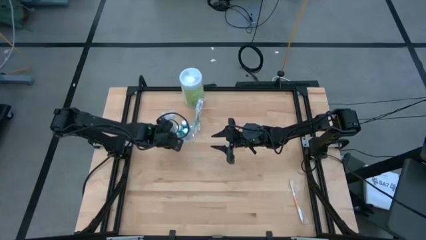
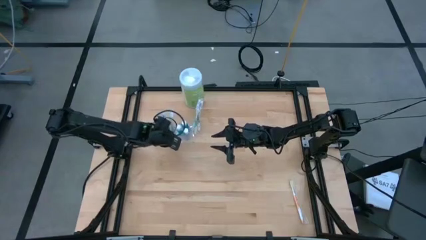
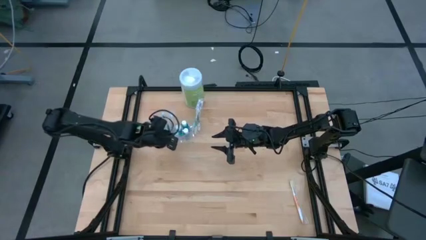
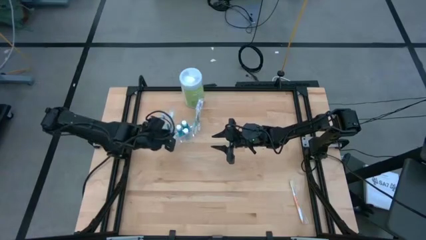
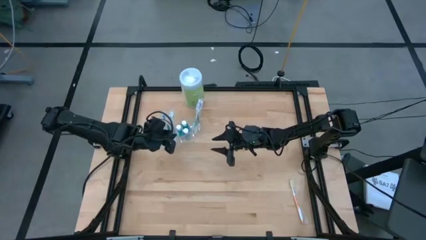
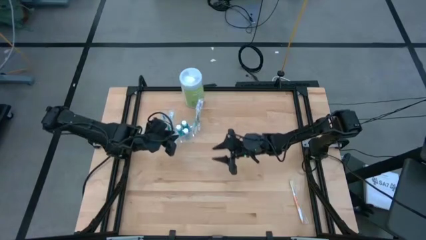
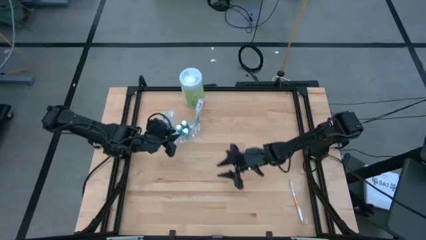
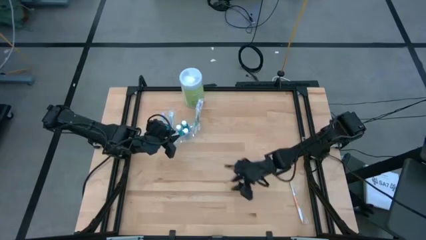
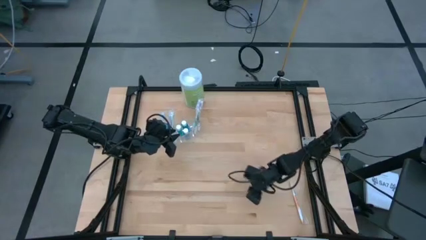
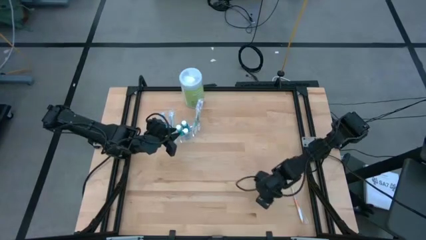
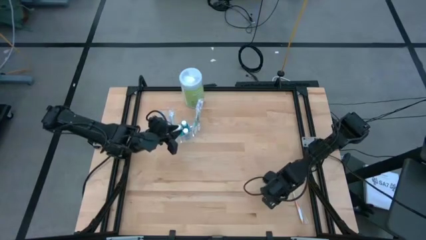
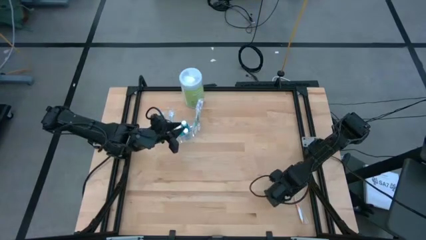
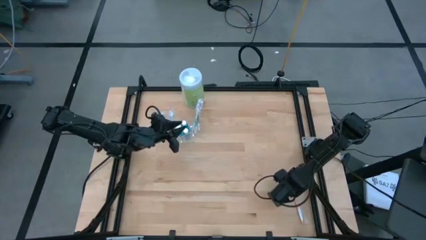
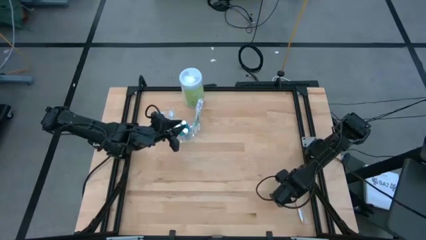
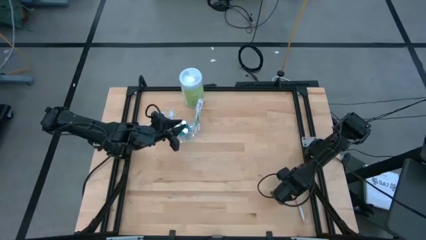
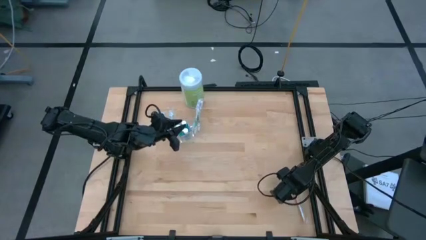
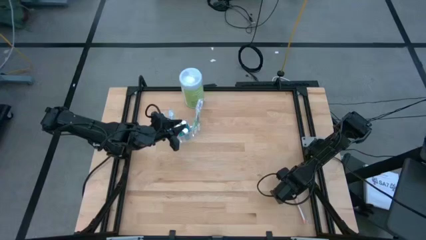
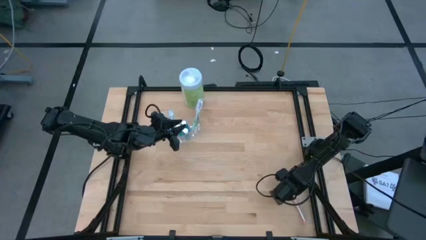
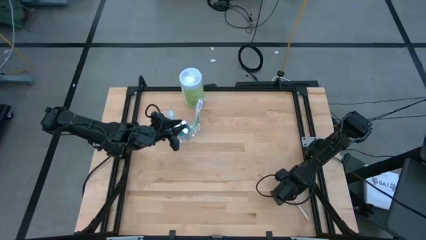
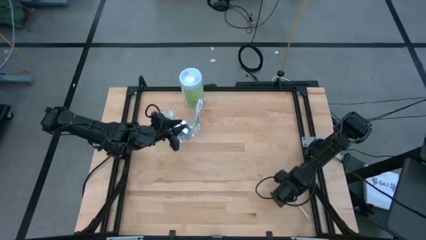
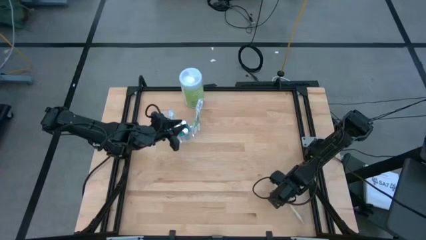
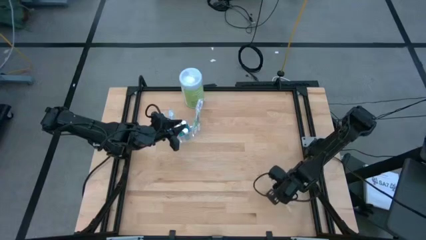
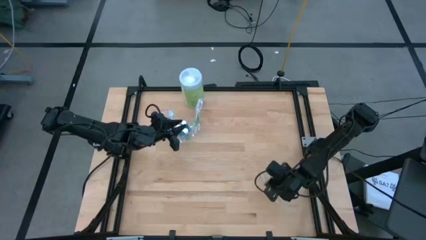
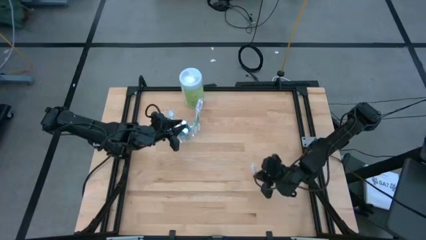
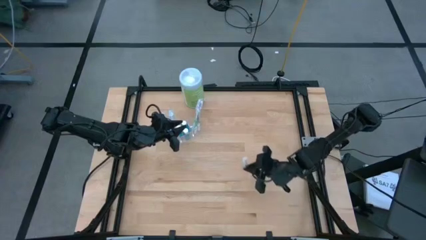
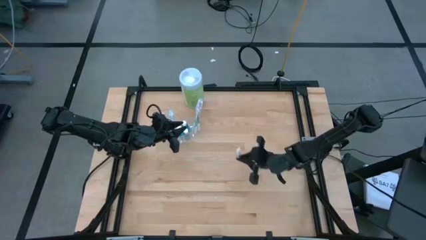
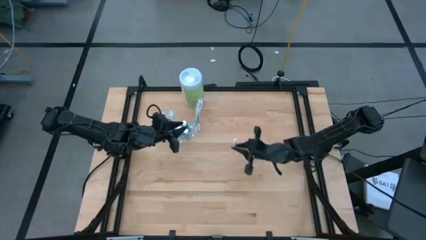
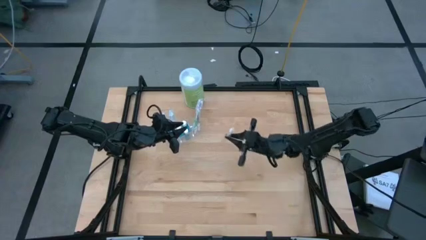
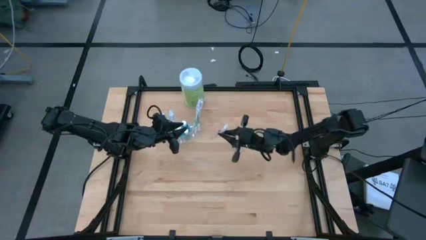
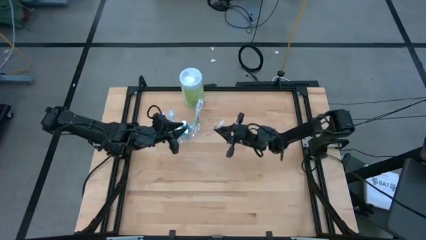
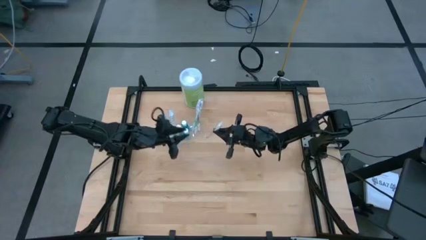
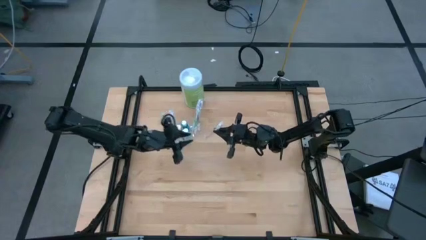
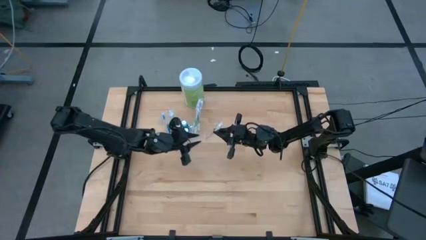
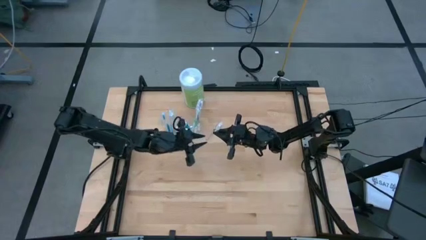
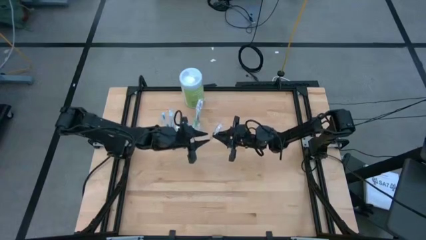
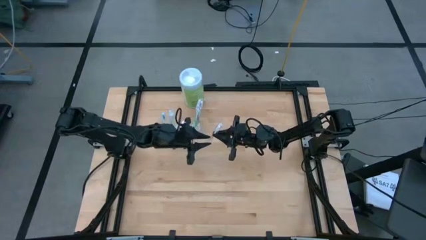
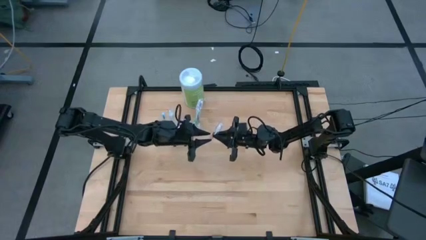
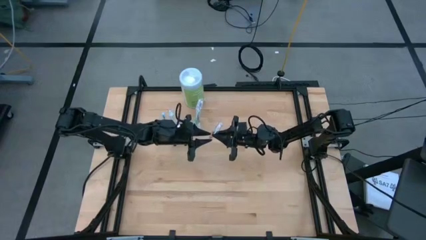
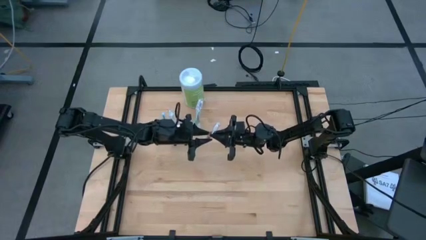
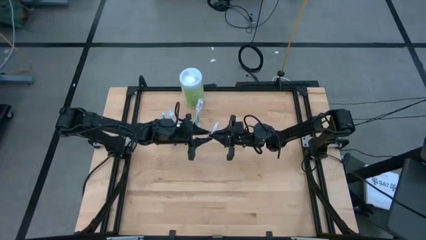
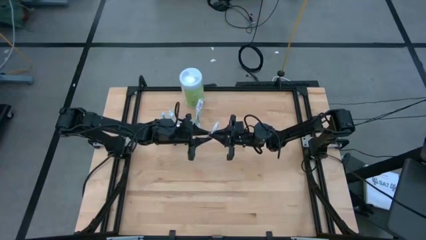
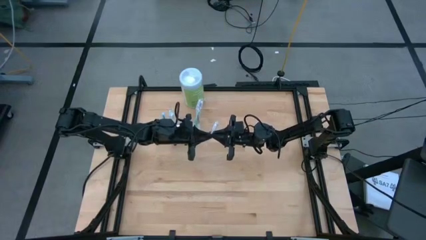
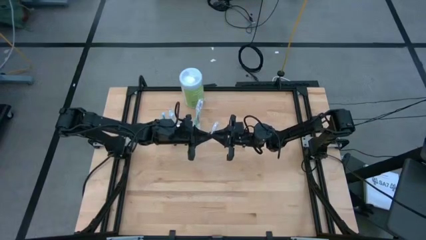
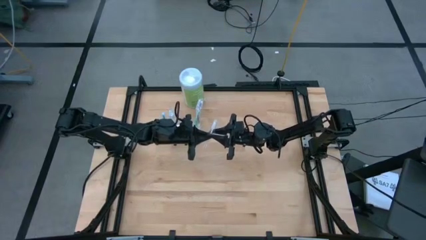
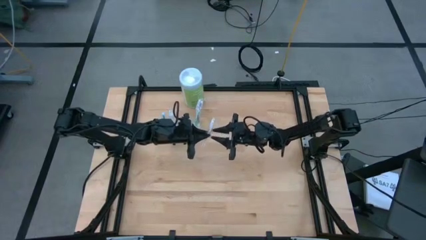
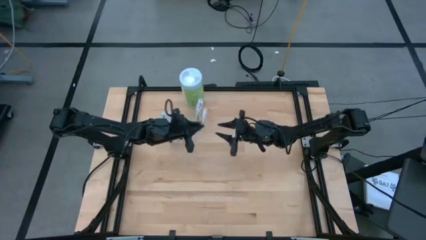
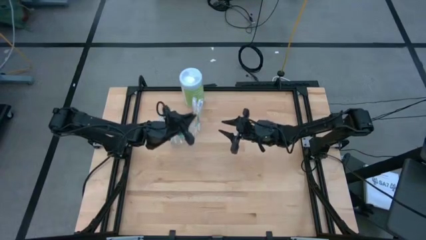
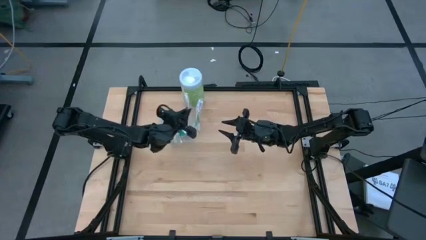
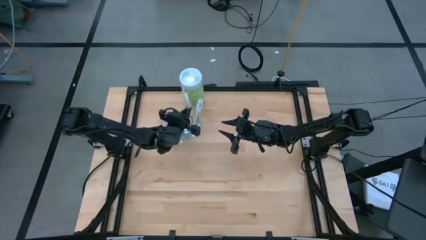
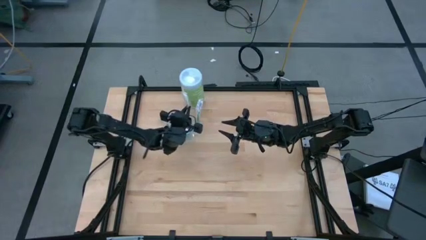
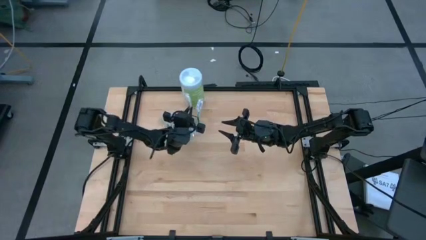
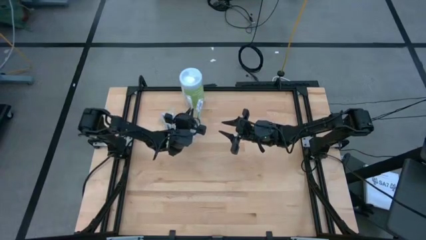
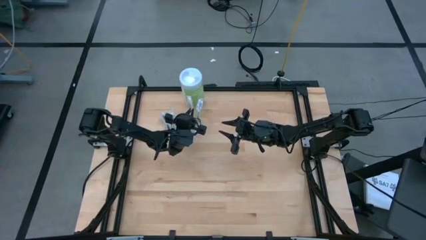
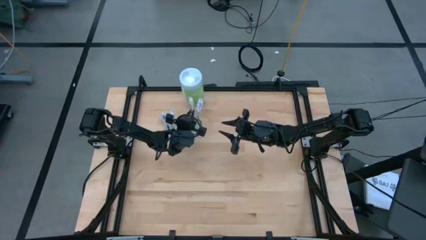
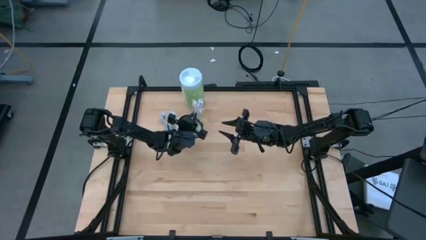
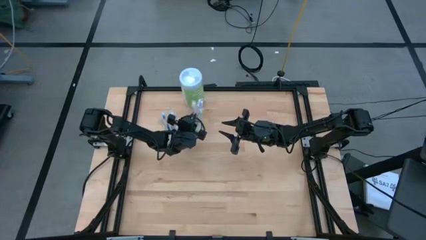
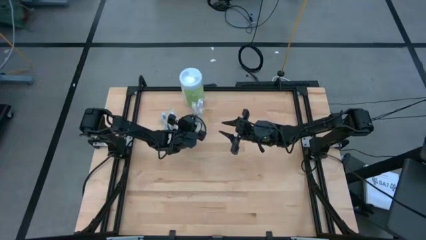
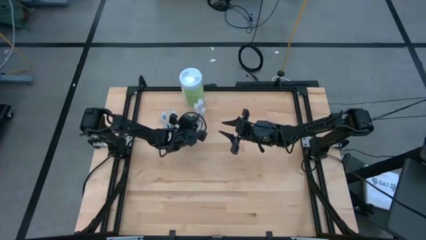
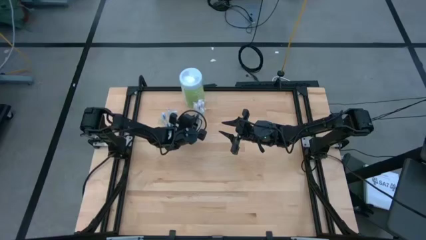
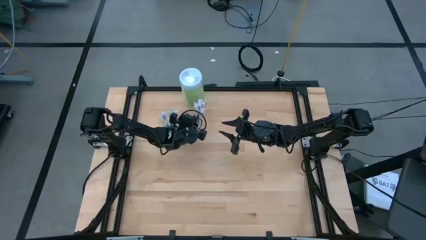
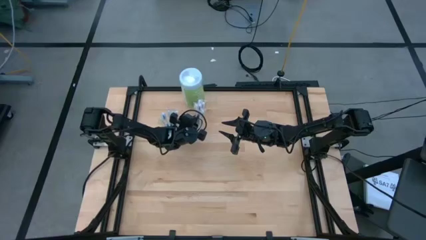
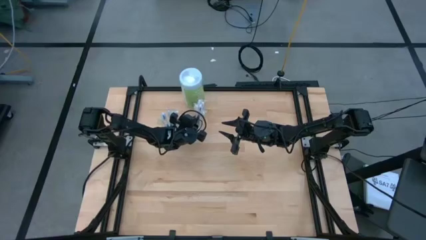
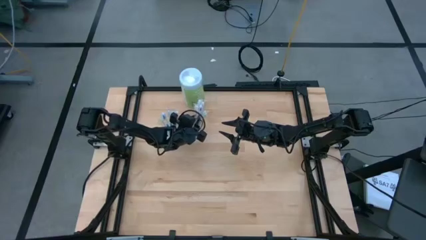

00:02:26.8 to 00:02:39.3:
Task: Pick & Place toothbrushing station
Put the orange toothbrush into the transparent organizer

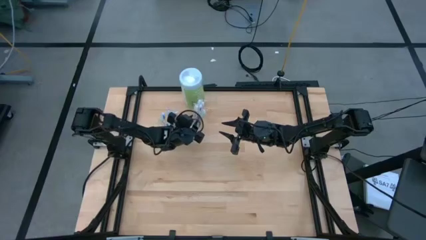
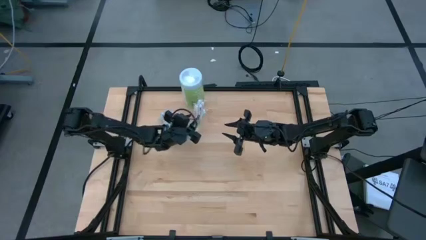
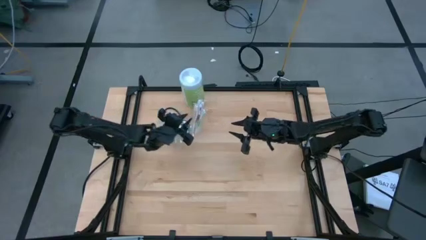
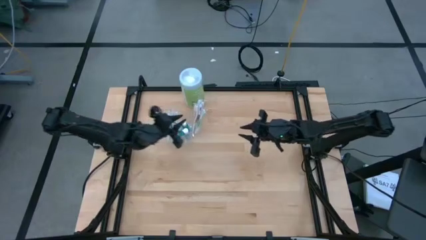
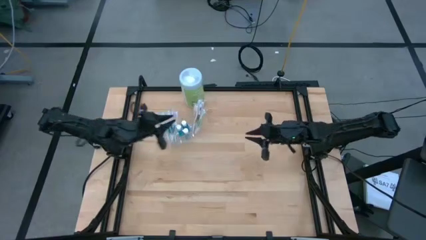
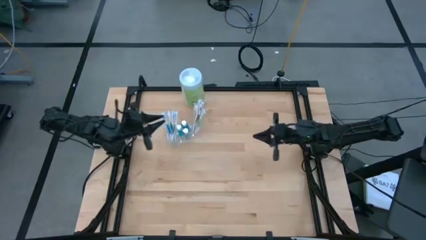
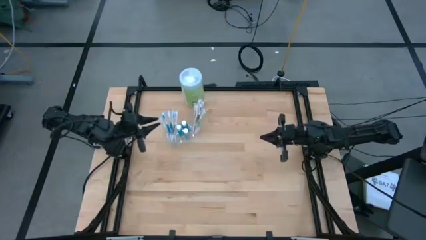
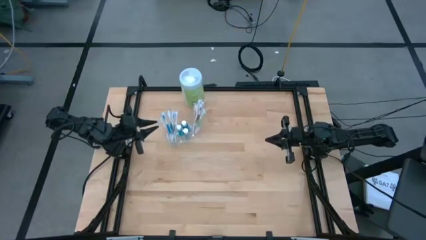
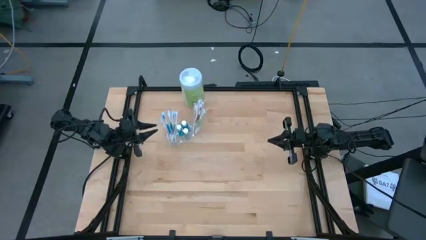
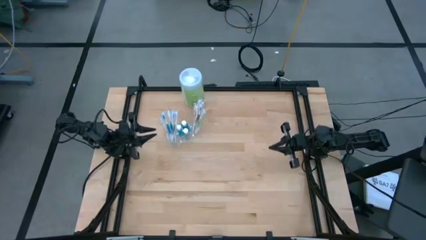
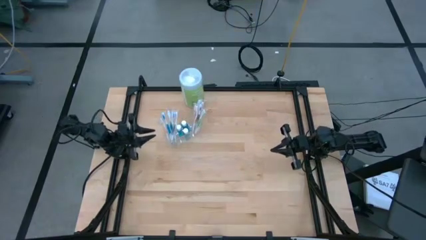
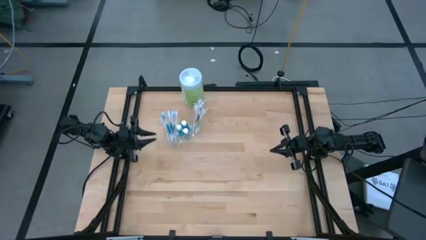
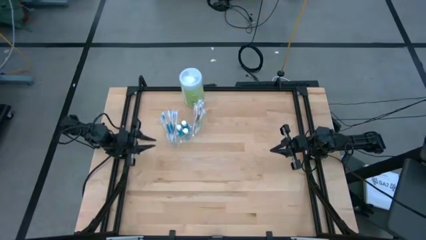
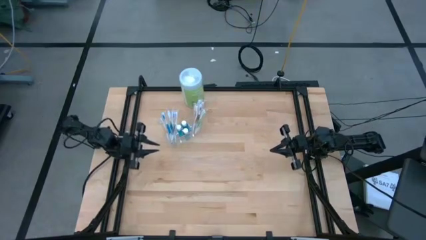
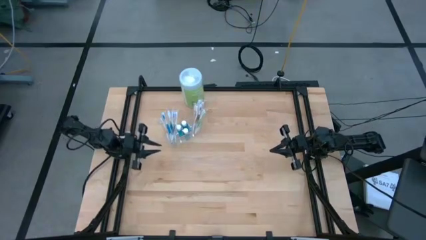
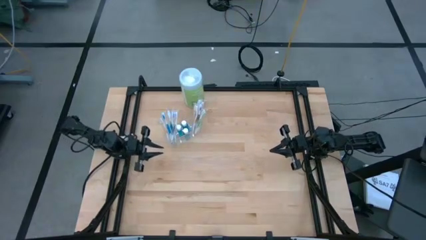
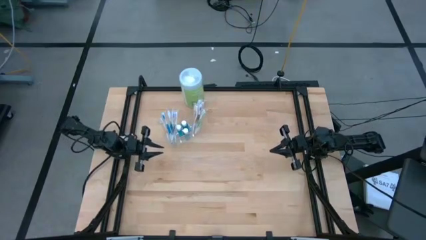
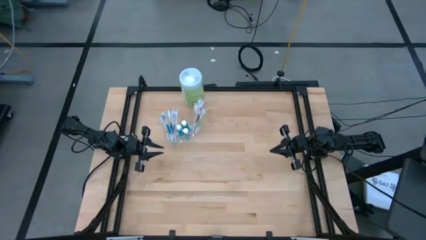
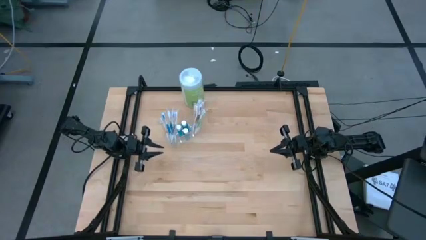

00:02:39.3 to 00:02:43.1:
Return to Home Position
